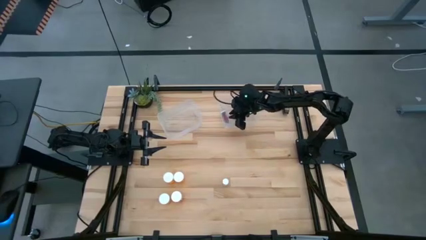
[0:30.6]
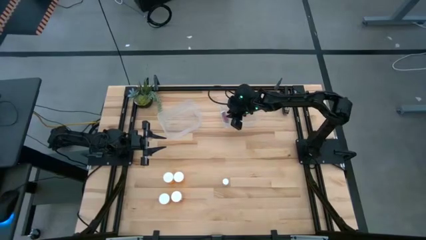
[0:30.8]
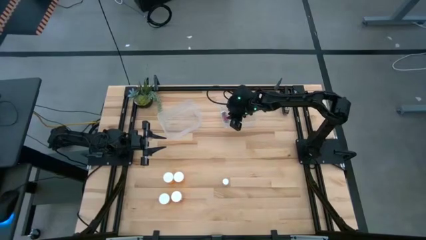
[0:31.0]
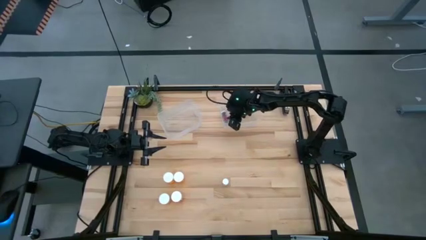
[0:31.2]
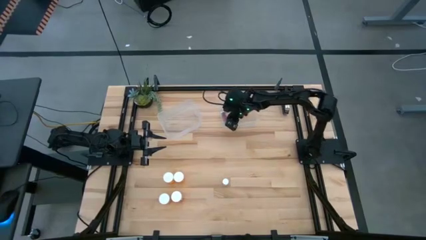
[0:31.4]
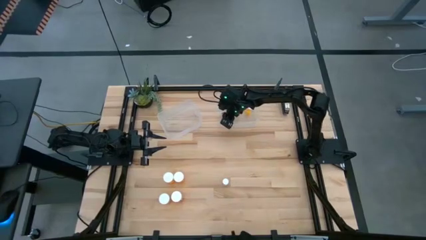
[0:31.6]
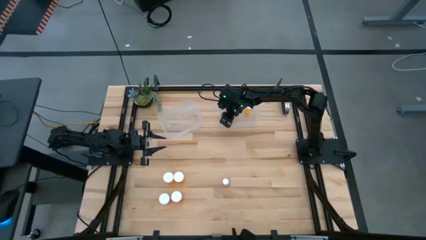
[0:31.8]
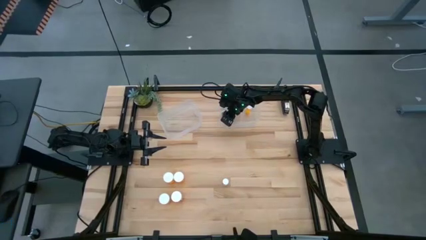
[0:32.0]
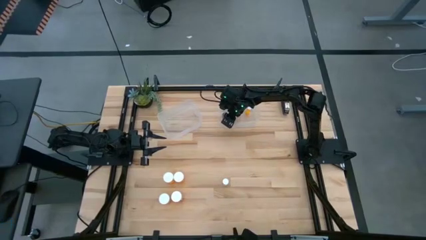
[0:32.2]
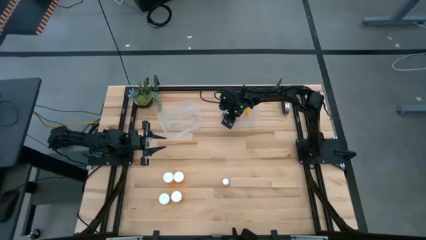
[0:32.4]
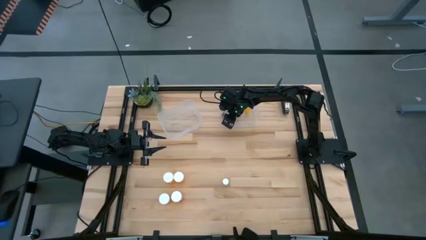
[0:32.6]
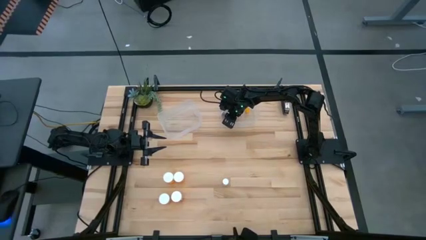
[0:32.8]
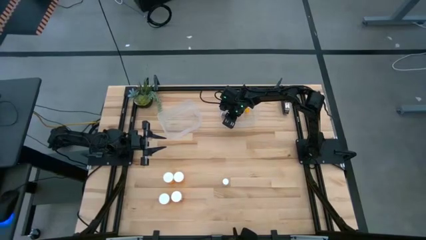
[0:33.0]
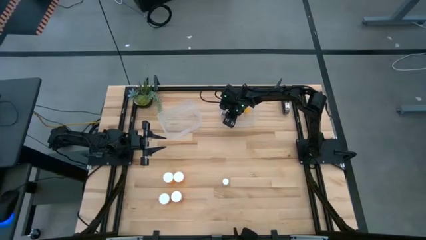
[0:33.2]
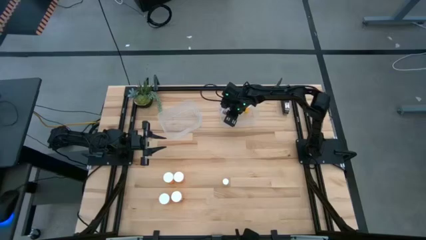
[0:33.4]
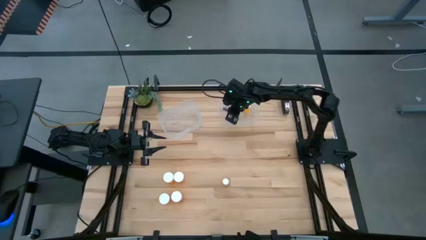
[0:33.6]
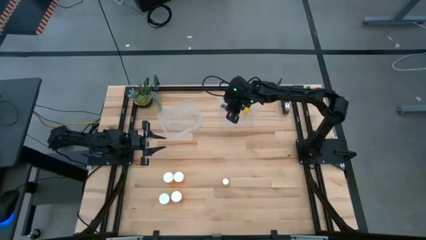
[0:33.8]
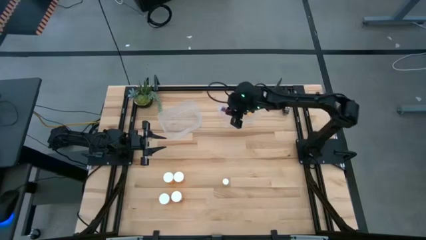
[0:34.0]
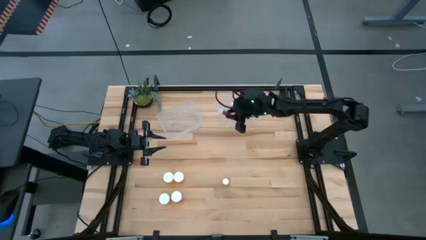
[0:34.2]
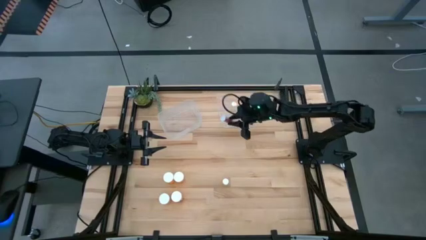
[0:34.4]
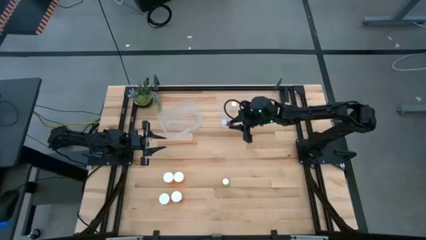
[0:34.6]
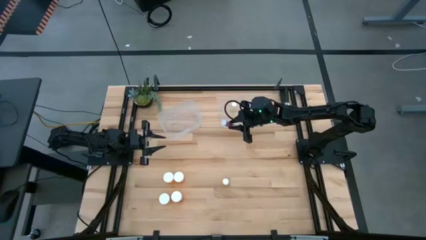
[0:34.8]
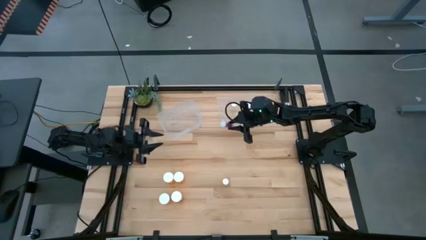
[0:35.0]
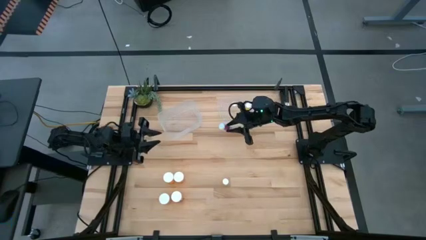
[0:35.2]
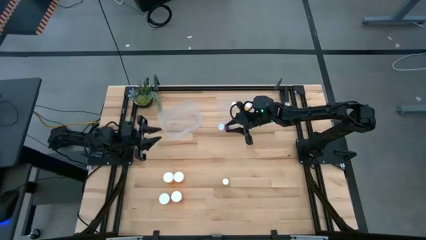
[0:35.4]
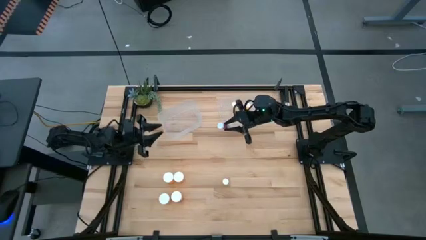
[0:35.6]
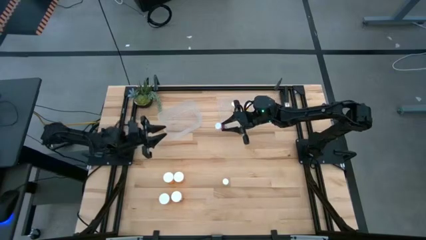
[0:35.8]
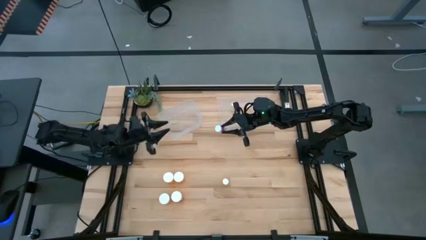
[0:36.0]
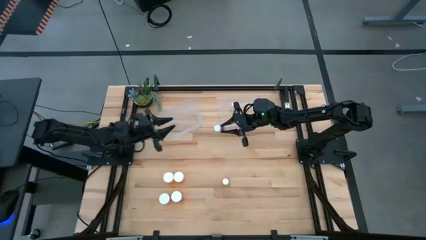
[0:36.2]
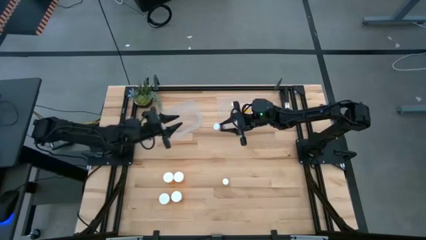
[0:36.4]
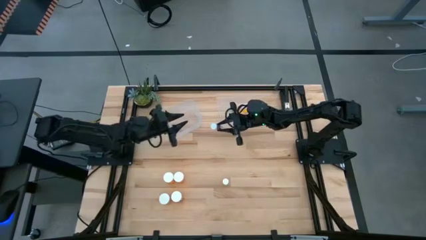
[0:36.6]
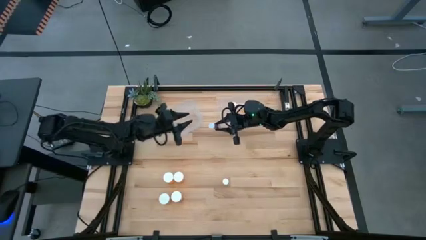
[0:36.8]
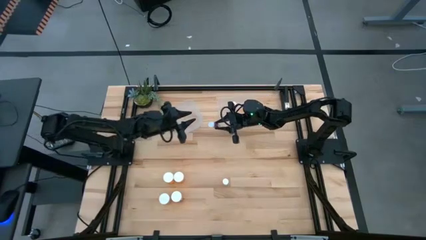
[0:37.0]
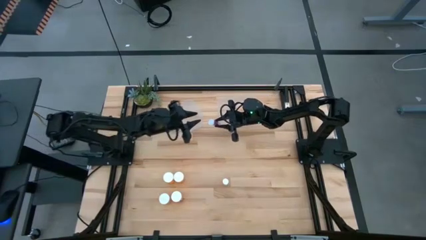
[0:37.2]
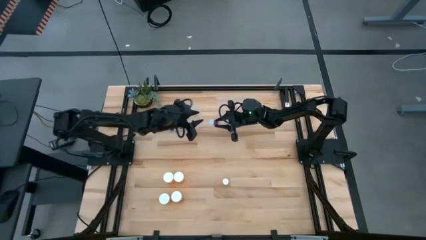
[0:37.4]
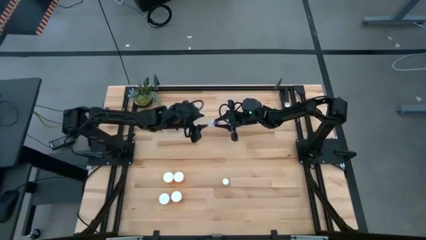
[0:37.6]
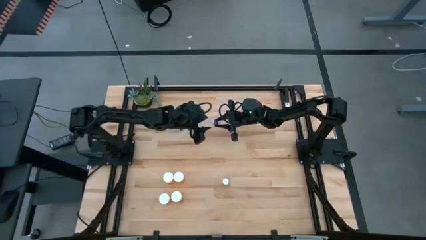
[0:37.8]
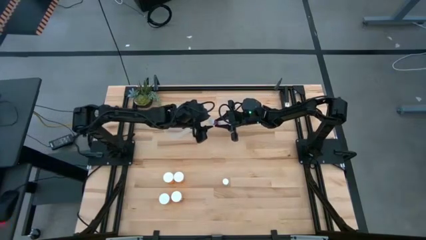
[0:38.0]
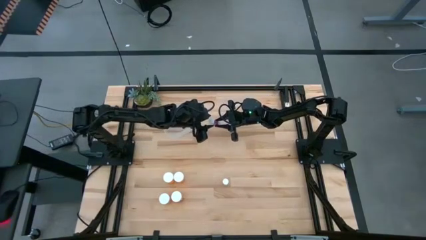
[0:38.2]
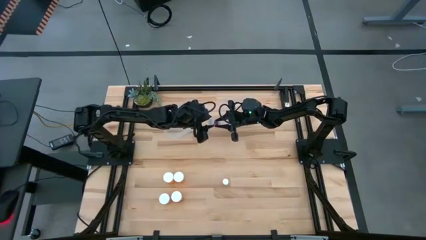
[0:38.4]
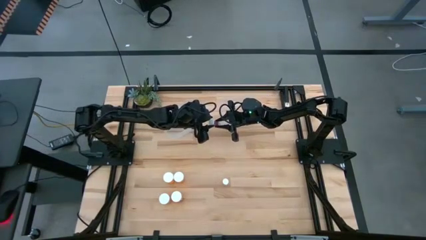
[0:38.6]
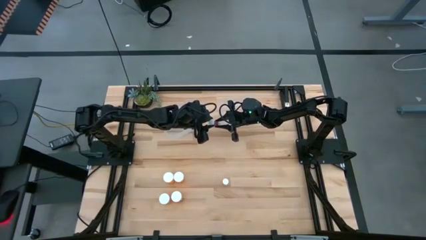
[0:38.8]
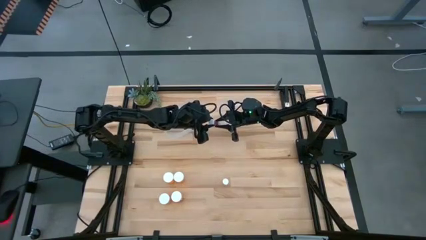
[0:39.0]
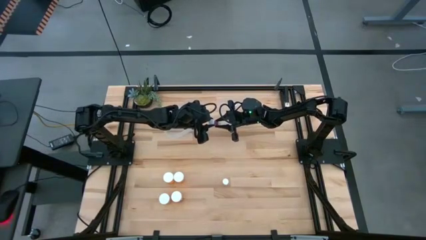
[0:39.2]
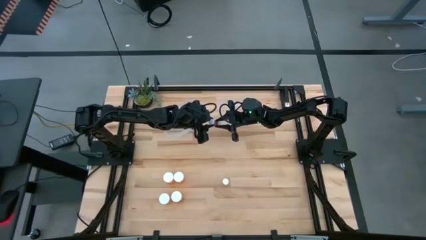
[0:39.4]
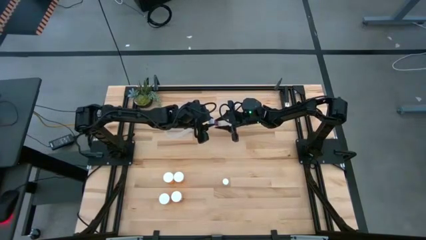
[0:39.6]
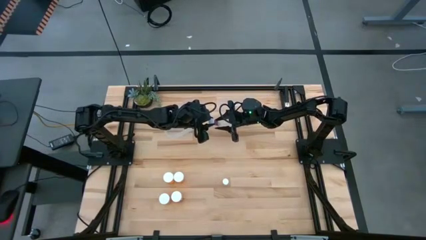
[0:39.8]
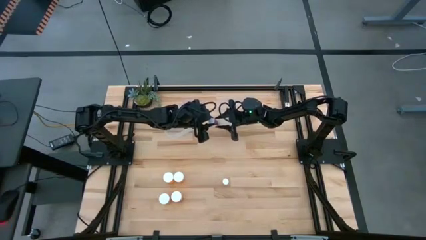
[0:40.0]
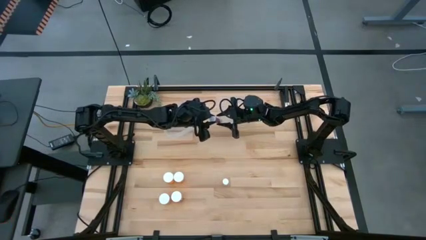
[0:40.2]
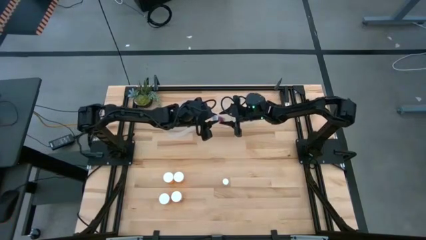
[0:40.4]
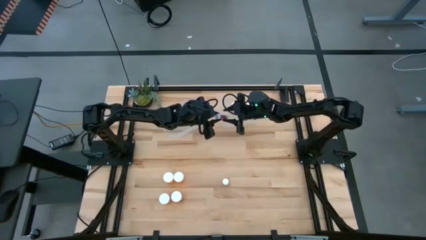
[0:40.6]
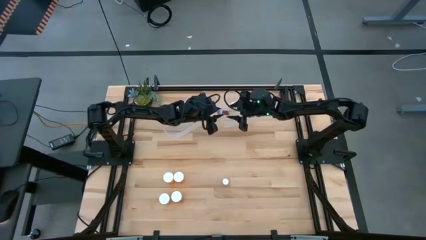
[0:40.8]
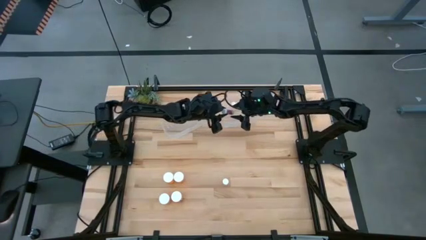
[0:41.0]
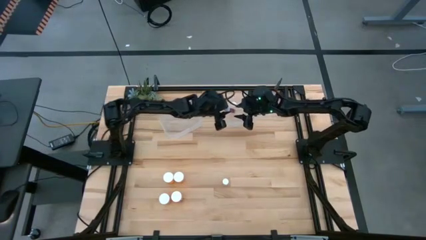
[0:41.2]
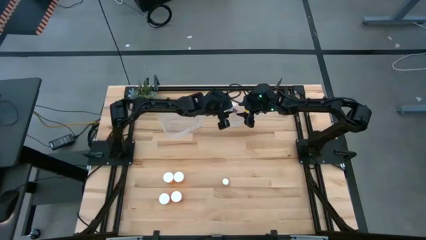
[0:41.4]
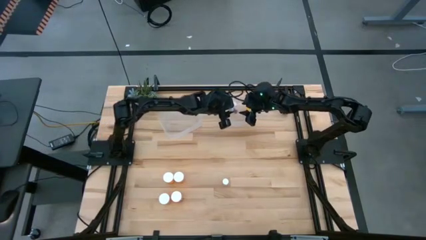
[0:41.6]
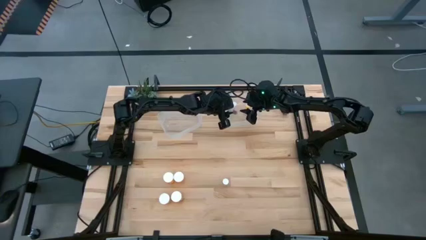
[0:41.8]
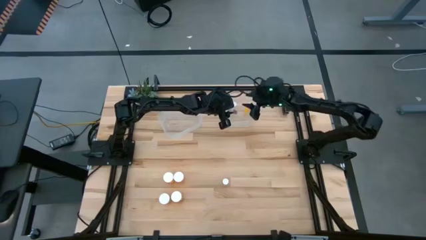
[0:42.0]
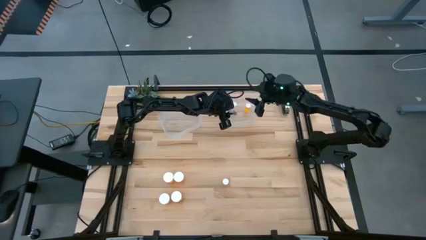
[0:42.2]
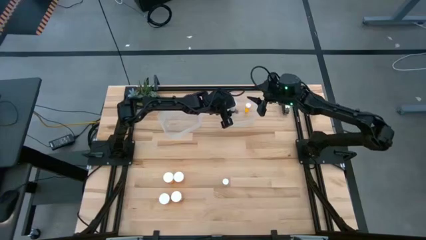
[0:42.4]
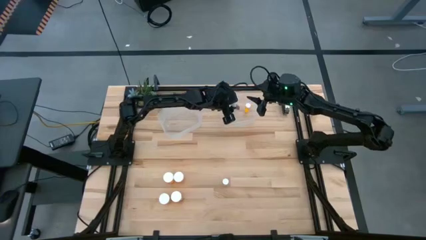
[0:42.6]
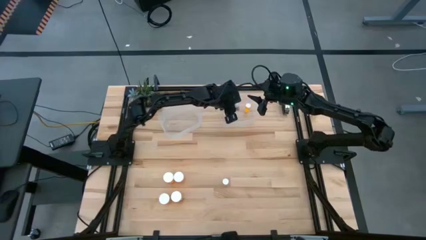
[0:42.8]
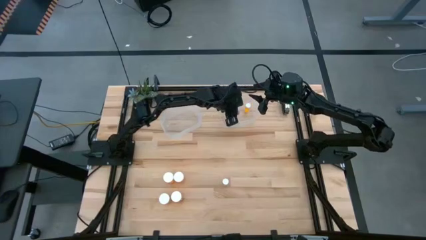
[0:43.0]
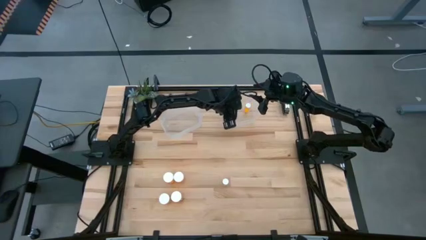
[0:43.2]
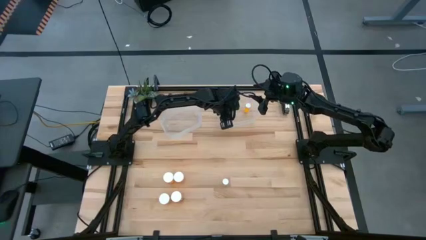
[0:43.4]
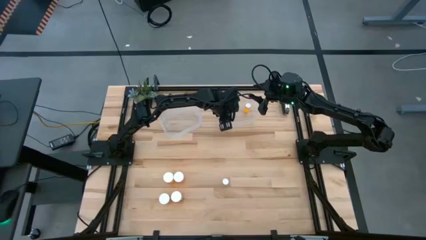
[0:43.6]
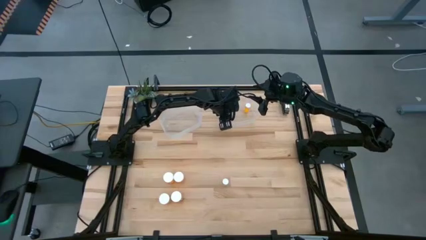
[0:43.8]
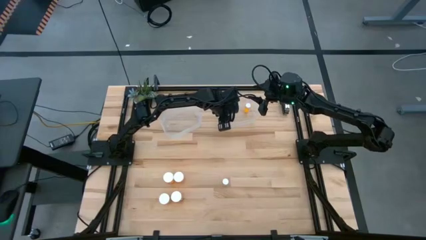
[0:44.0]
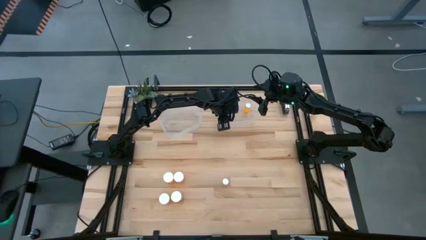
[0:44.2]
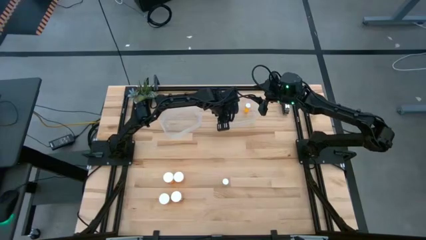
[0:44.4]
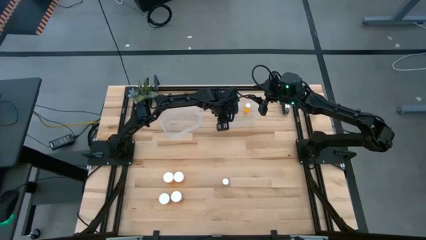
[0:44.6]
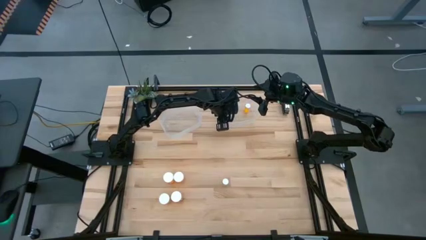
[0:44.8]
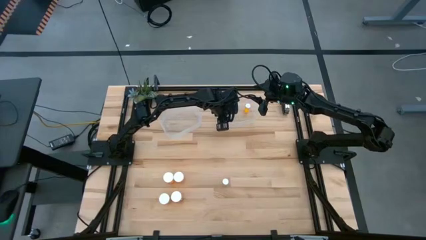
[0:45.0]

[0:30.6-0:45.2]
Task: Pick and place medicine bottles into bin by pill shape (circle, oval)
Put the blue pill bottle into the right transparent bin
